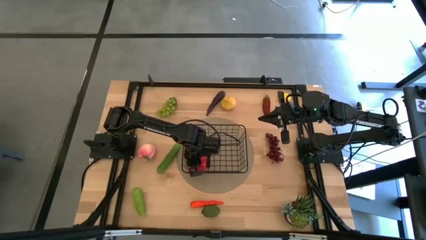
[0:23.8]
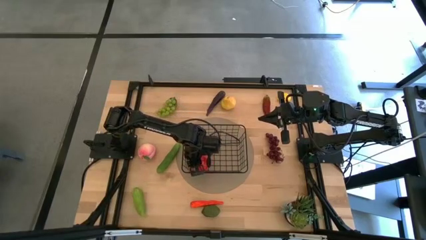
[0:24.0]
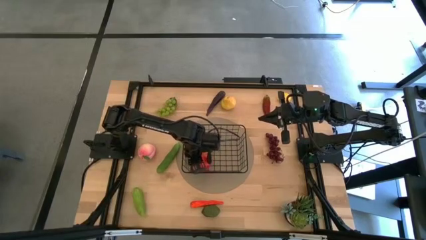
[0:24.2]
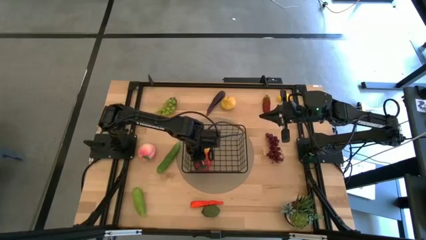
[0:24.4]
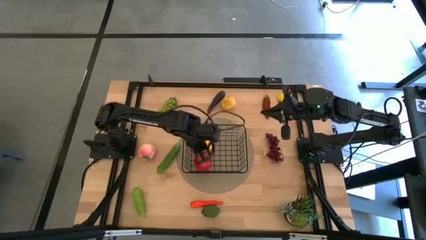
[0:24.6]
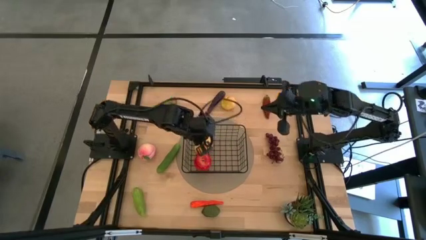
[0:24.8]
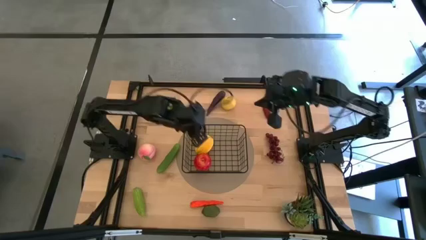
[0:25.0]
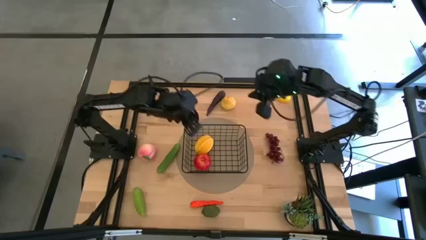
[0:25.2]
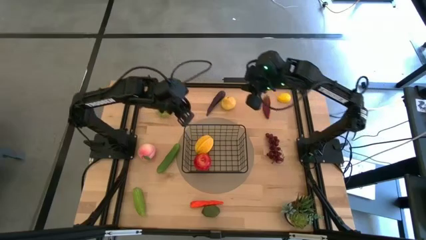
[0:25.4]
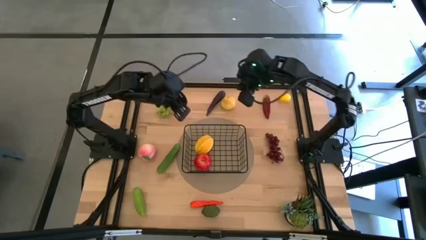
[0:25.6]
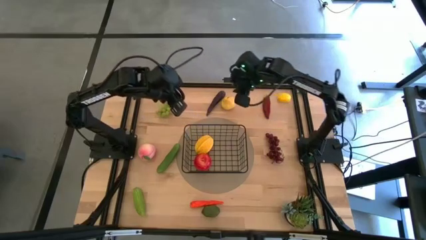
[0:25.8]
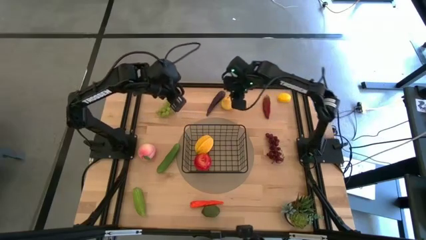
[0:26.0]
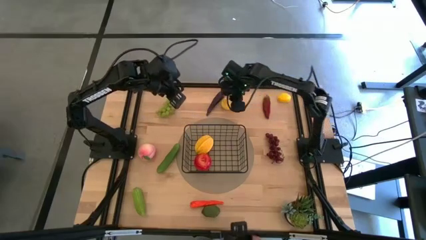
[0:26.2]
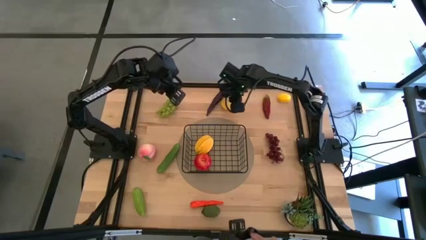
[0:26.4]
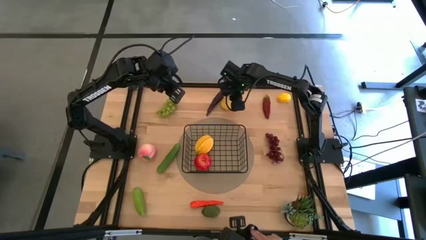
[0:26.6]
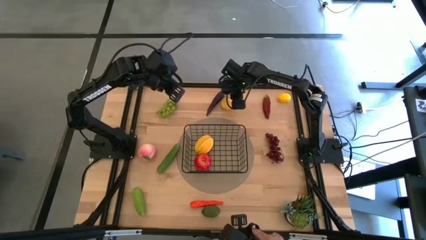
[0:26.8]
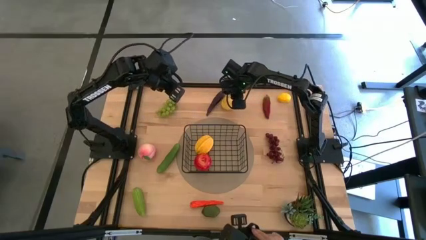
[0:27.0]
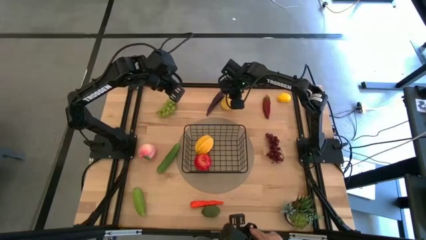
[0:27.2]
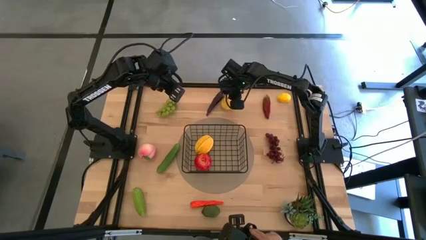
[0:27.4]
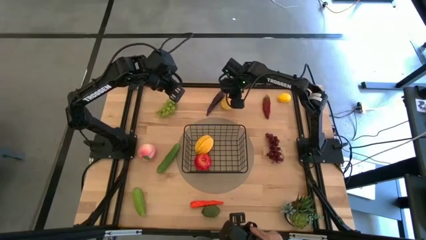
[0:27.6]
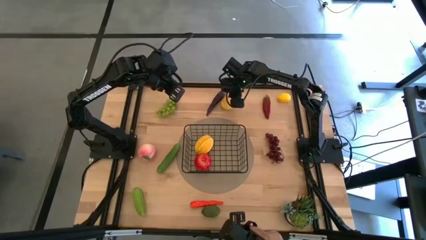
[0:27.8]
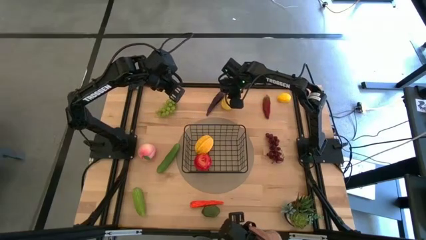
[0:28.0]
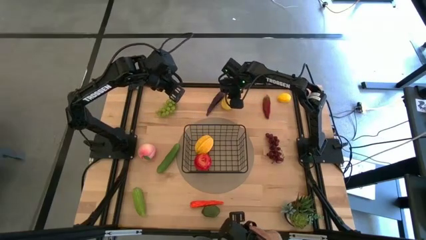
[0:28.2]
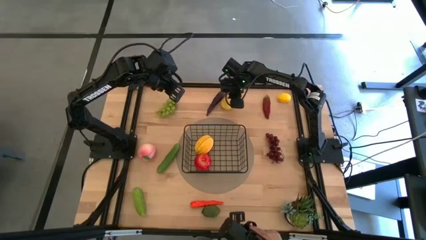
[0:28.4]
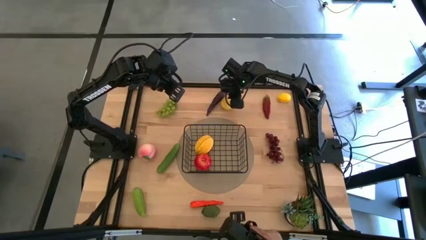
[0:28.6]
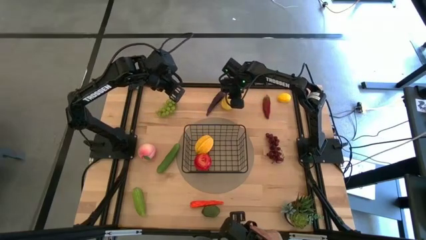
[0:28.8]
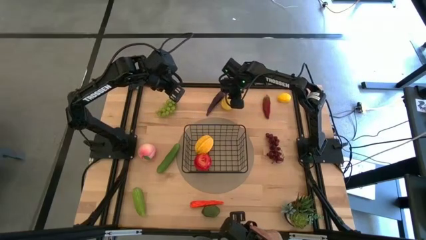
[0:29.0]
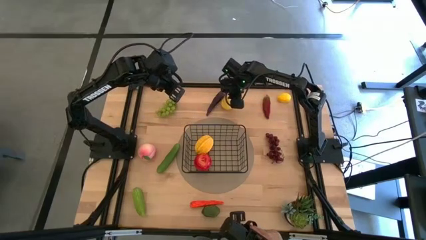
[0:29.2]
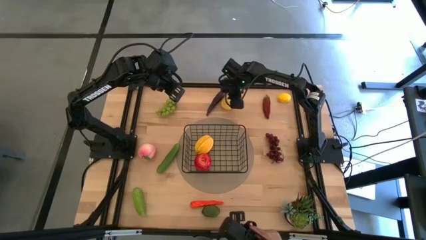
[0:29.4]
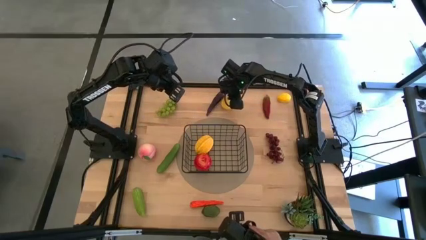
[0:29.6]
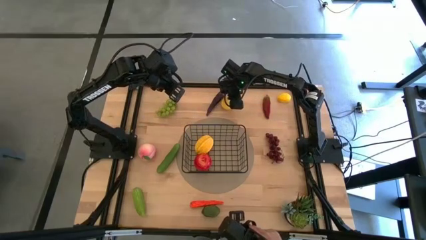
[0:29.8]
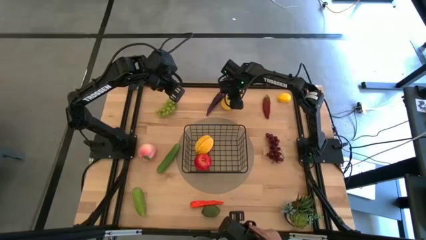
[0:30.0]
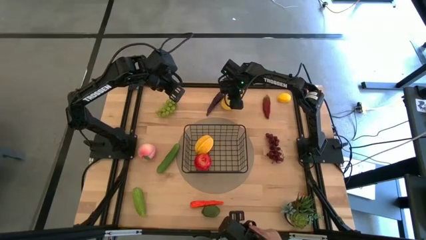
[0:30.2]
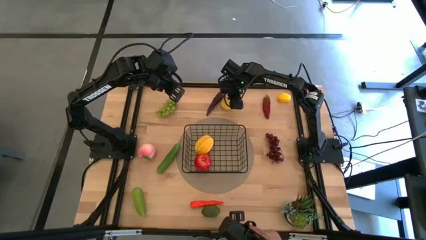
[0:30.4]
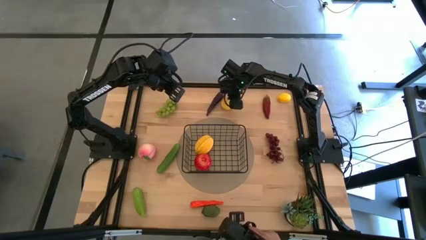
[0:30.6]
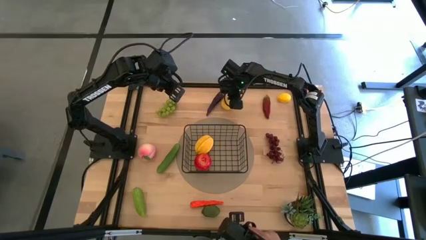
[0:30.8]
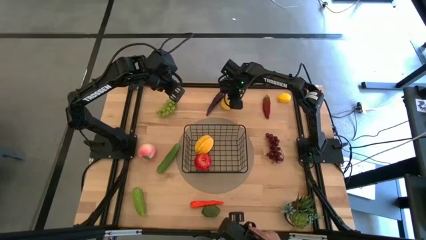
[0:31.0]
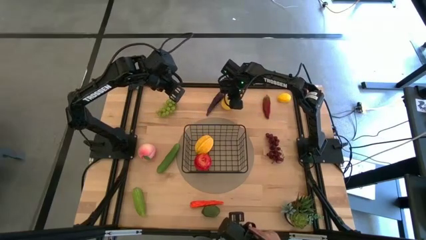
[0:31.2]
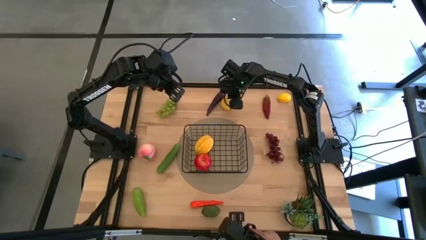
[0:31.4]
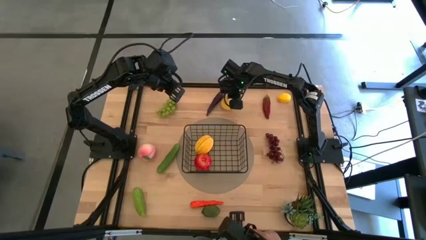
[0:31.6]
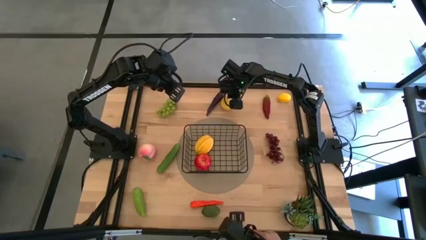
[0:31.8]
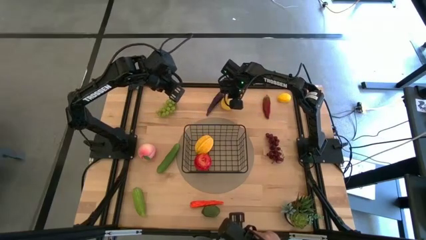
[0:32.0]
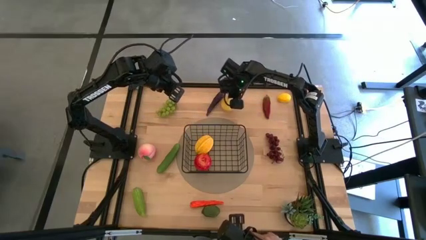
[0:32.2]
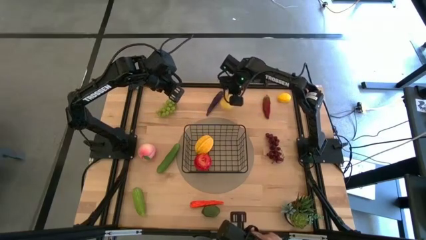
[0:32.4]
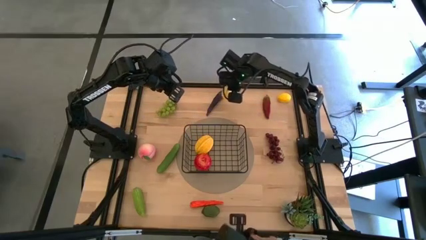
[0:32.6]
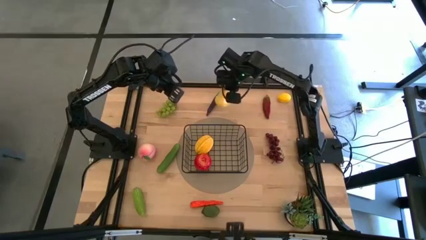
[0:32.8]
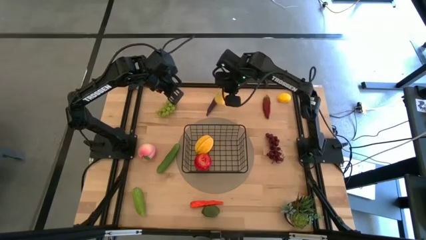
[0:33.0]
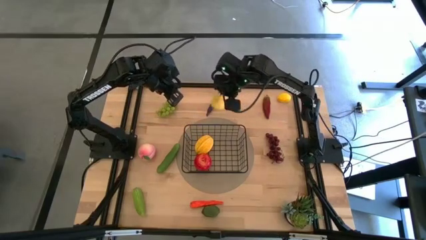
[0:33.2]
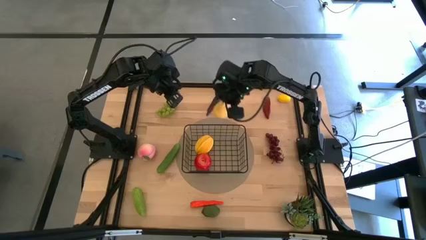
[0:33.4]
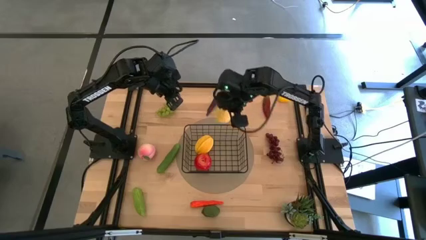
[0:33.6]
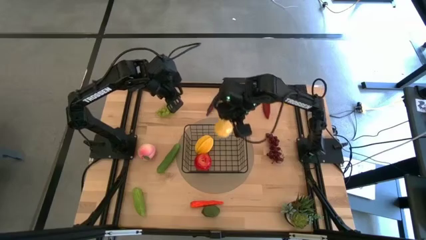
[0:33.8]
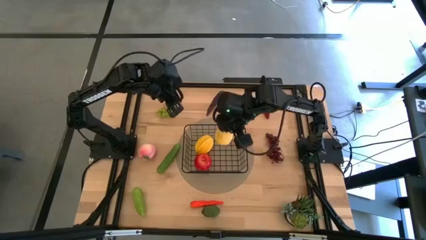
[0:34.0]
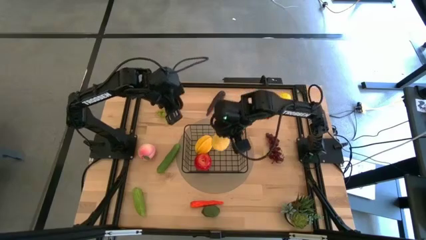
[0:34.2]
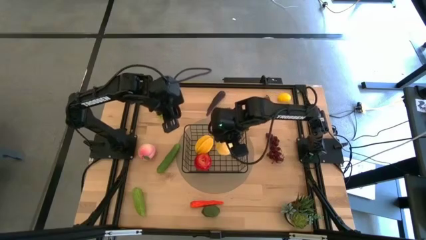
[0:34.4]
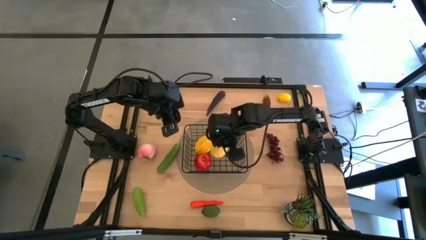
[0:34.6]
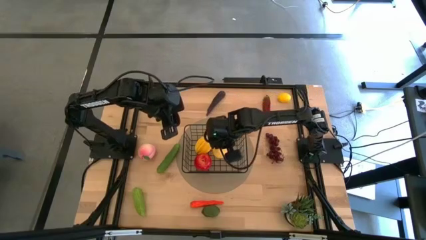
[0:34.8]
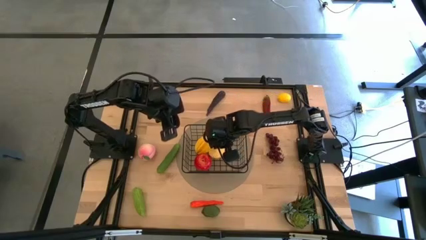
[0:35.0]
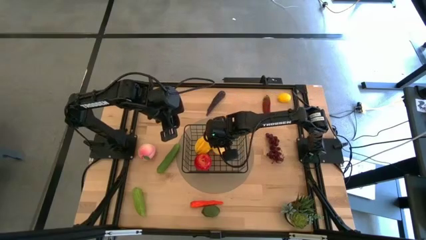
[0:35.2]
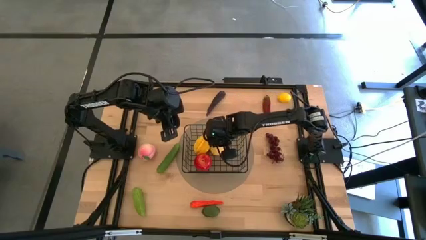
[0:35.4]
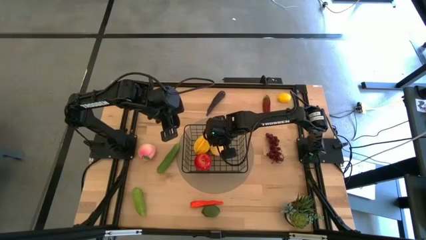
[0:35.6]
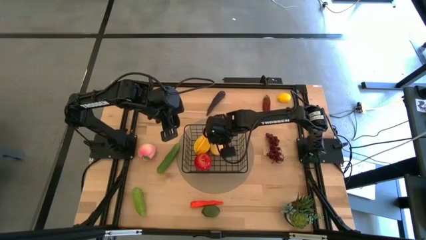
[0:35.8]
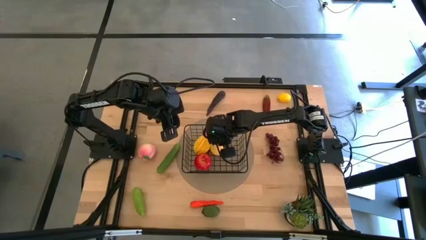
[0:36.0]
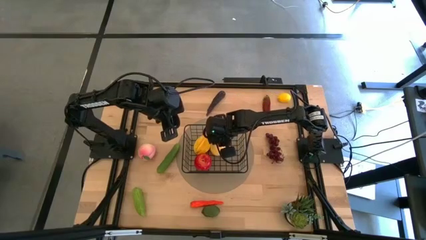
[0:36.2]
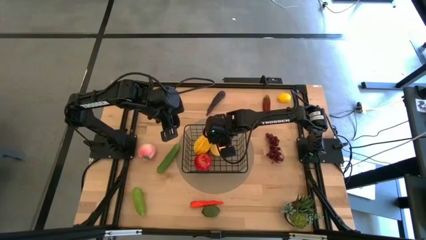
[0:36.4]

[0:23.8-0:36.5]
Task: Build produce basket
Put the yellow pear into the black wire basket
